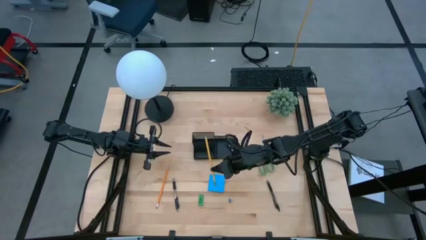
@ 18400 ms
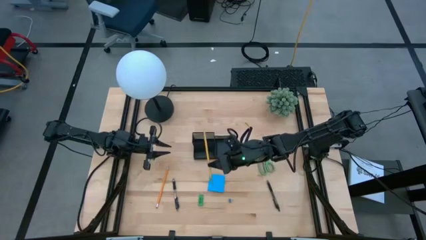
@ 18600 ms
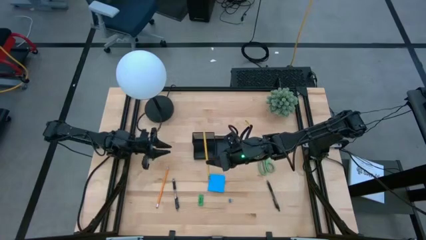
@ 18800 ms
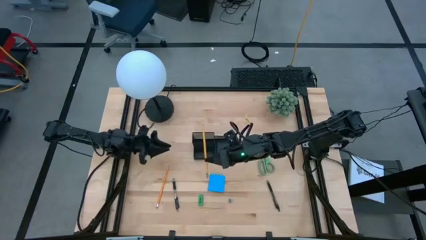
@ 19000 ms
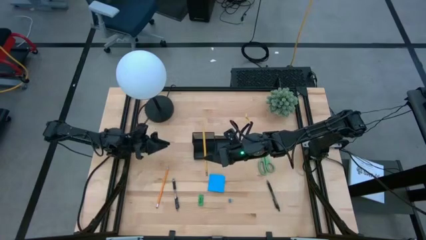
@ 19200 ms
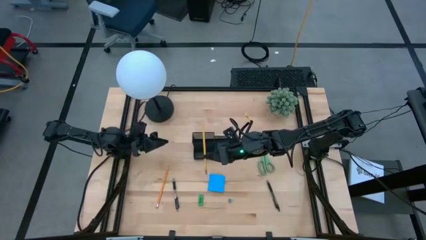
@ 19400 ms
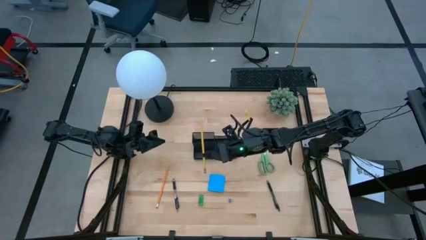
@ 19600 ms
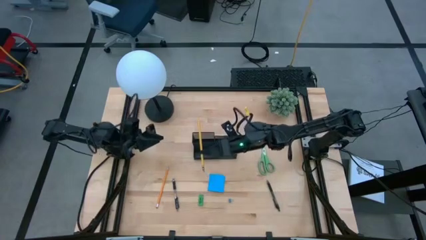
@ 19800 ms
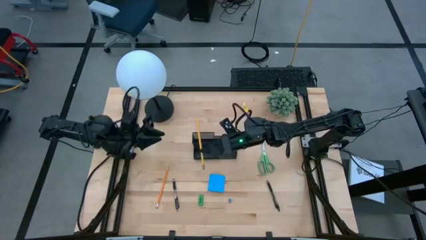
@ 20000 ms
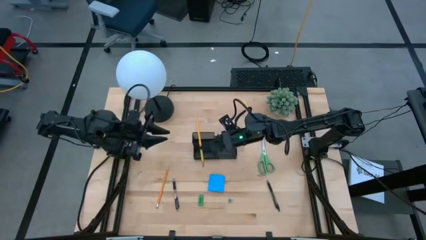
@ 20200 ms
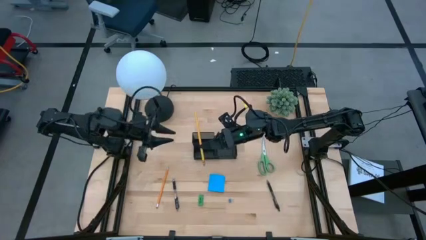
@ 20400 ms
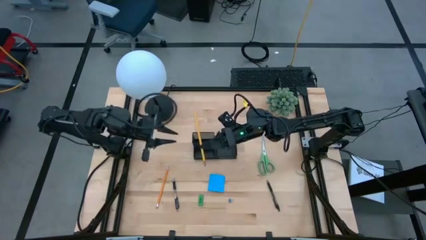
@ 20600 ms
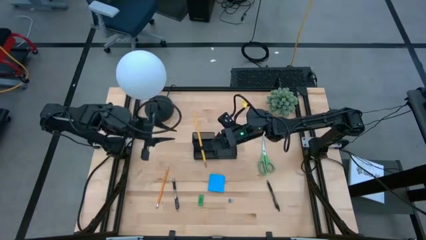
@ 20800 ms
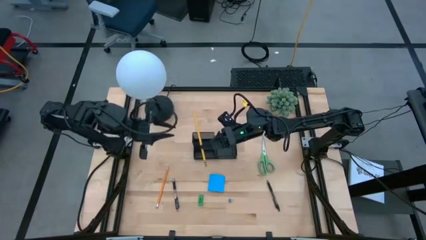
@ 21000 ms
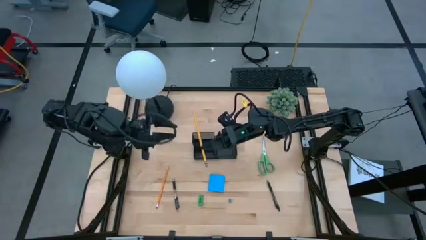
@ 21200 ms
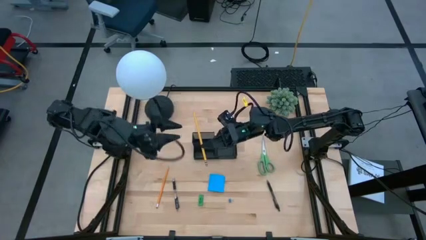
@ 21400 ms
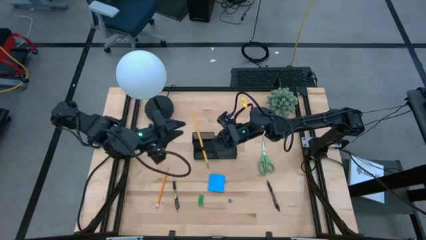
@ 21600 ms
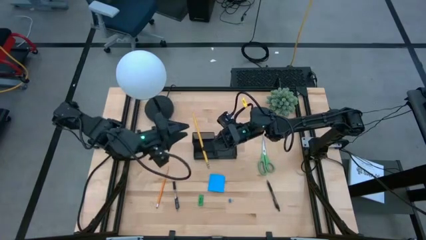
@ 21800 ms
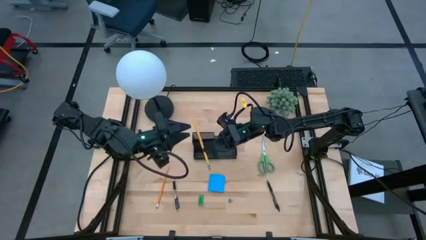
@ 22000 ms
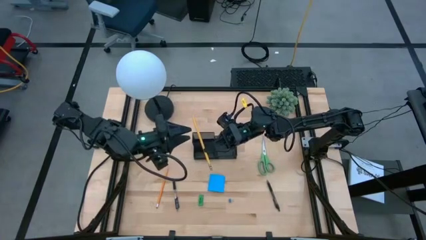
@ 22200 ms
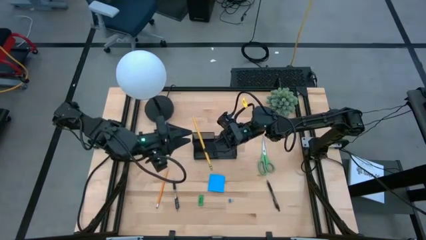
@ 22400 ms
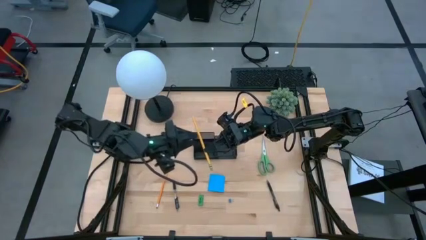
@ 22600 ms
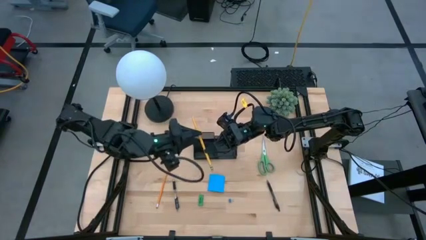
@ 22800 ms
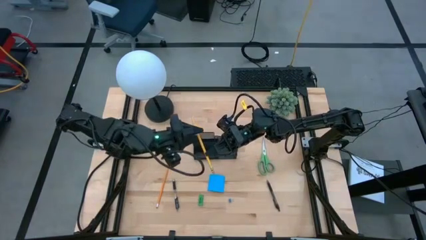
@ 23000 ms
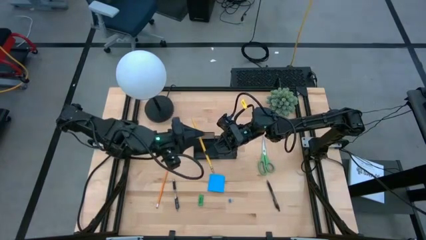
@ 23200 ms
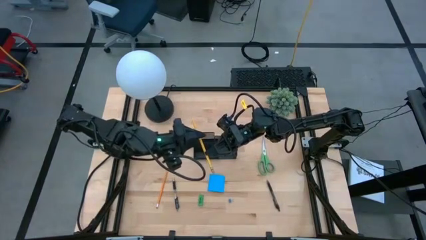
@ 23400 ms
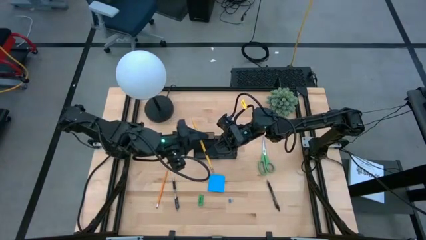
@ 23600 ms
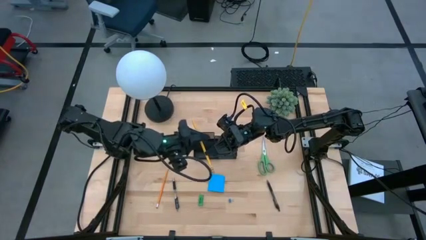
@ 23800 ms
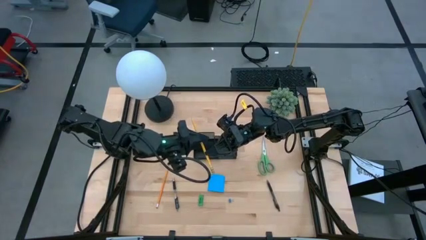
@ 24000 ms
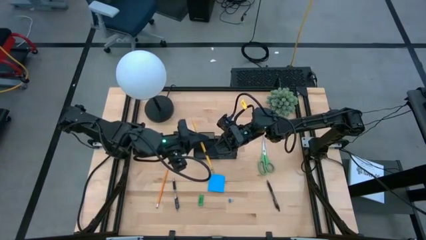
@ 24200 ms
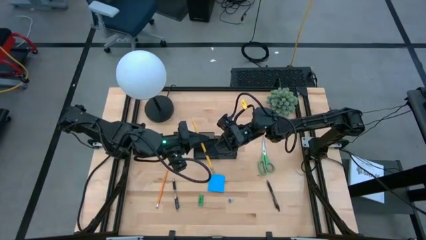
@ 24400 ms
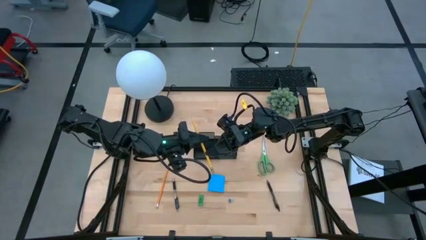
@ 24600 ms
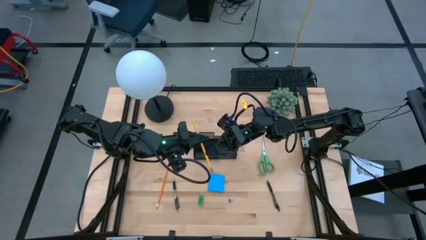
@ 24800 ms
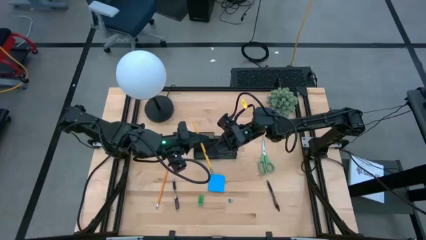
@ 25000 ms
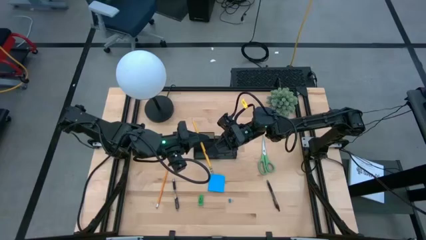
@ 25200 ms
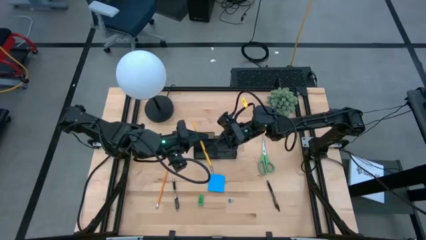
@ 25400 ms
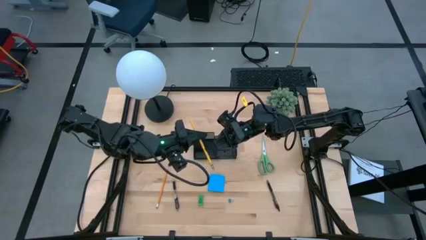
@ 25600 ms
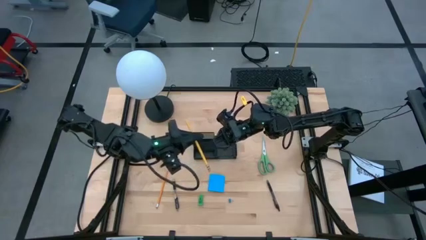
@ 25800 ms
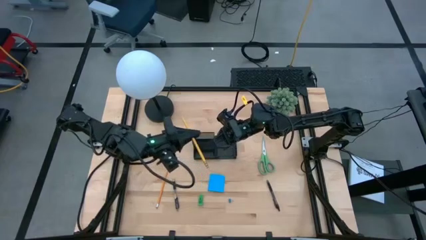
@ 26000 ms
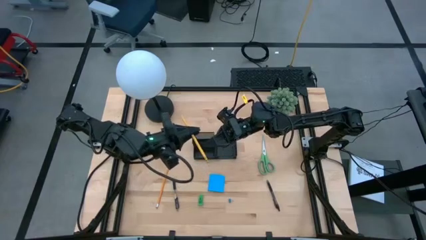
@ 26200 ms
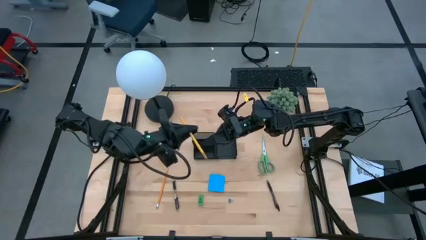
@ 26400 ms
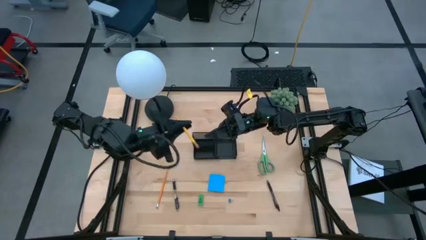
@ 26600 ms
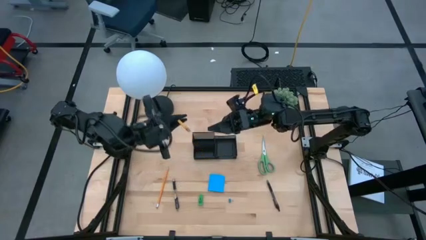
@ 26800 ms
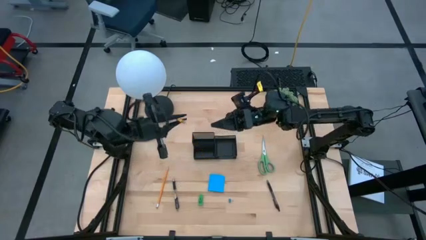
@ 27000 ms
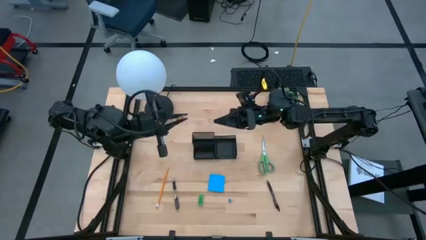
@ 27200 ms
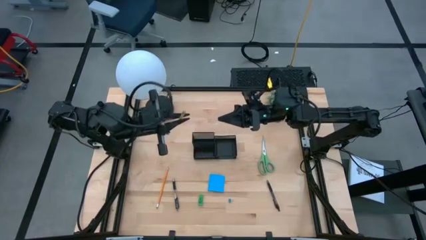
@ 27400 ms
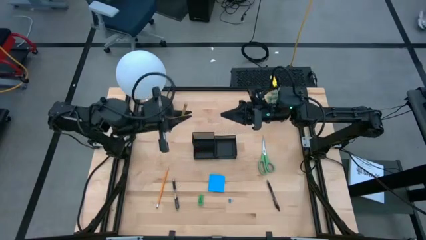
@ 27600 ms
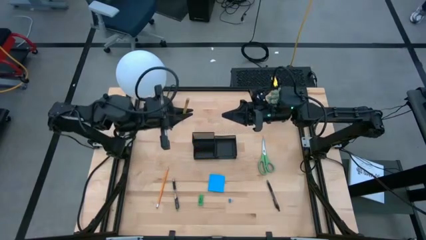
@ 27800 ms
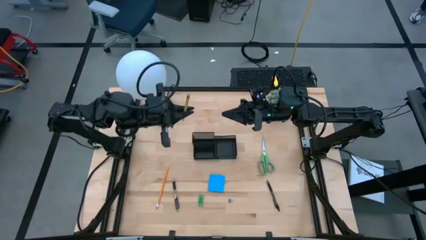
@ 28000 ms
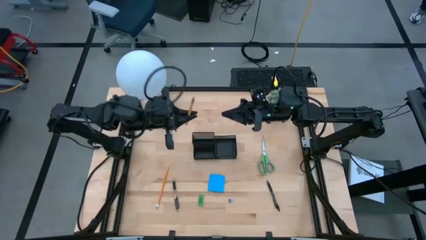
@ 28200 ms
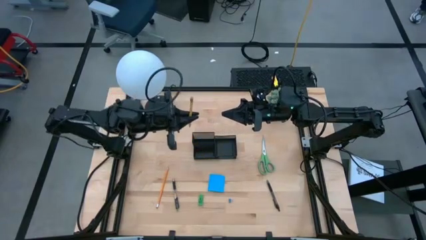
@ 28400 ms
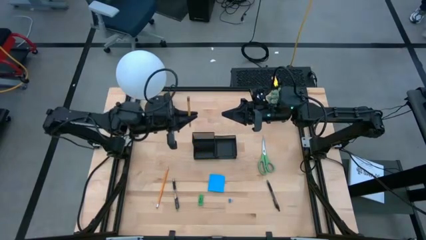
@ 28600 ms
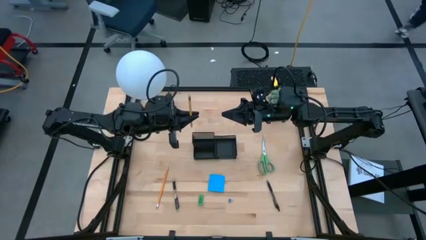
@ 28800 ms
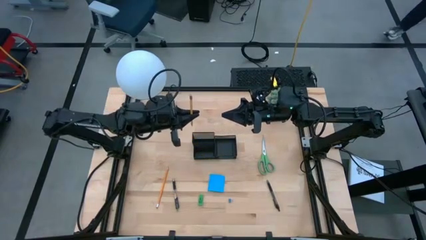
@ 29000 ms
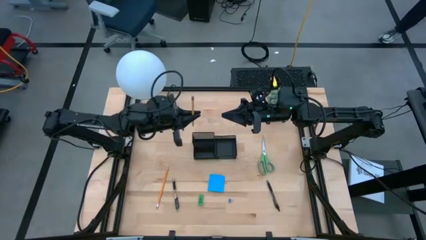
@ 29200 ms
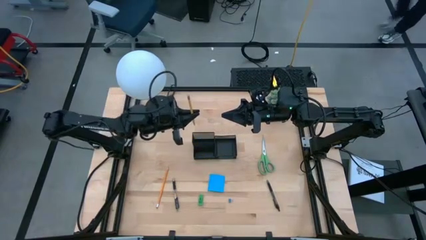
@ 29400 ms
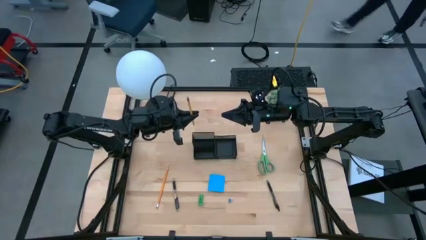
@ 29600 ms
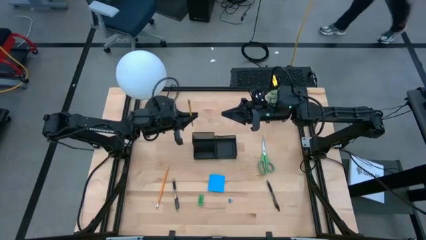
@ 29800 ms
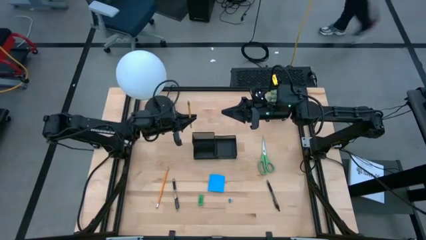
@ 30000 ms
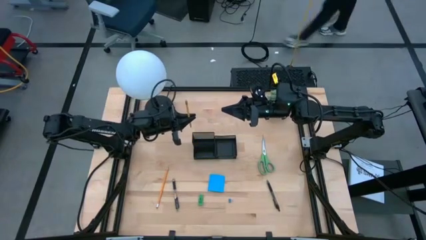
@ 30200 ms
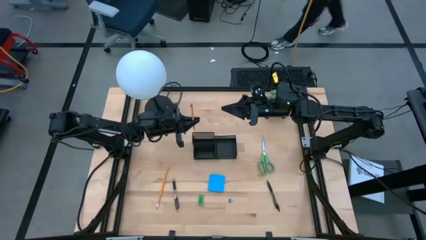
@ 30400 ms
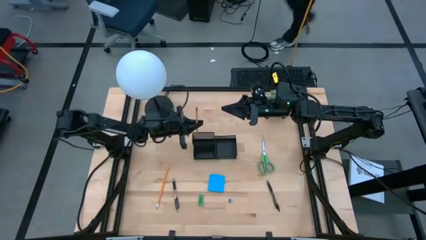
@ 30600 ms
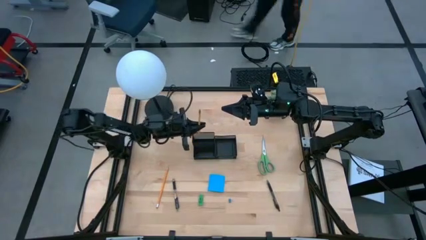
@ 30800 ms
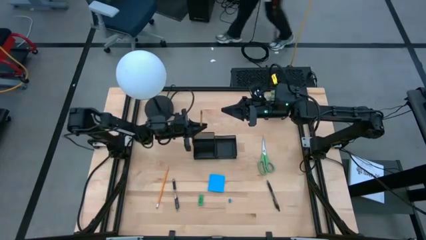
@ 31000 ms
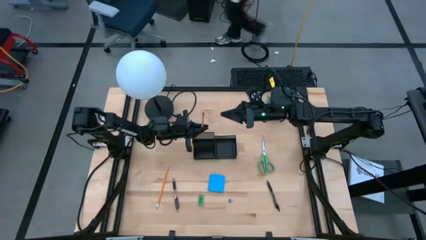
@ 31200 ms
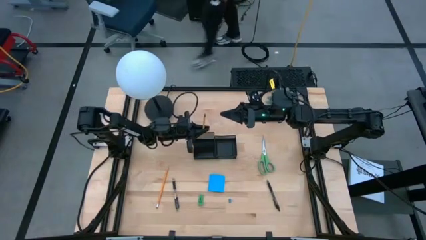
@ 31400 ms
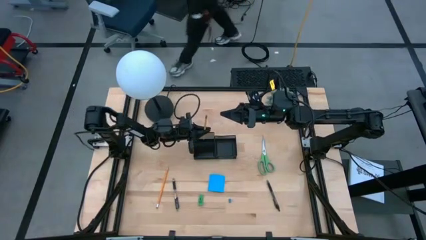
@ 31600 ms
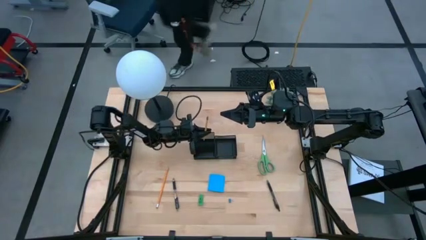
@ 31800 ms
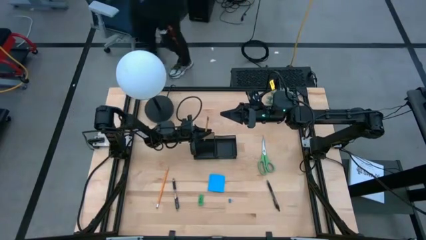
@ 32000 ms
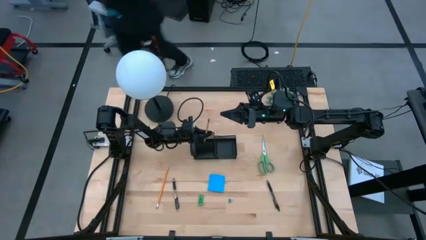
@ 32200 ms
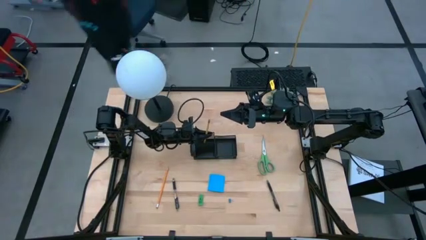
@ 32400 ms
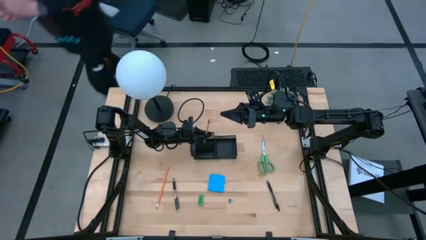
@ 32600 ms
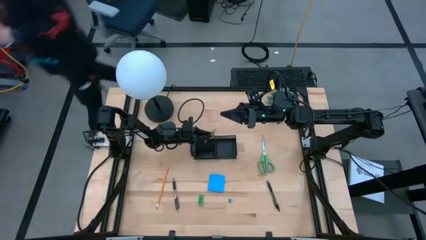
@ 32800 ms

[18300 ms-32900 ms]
Task: Pick and place office supplies into organizer
Put the yellow pencil into the black desk organizer
